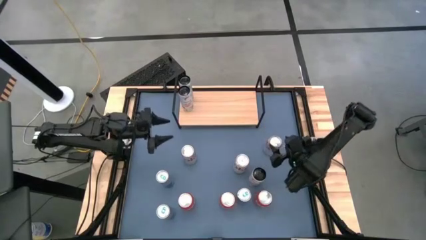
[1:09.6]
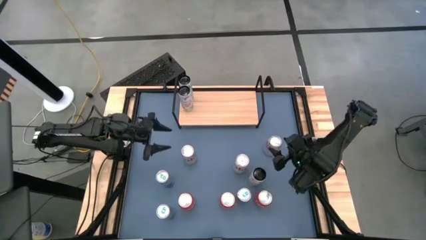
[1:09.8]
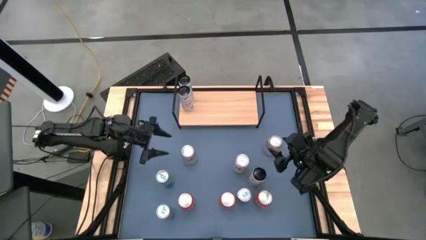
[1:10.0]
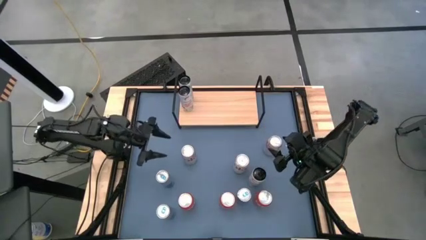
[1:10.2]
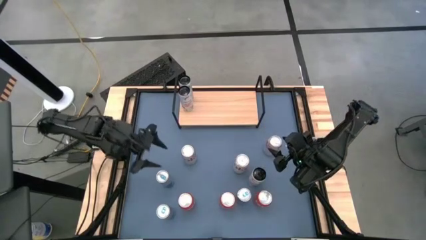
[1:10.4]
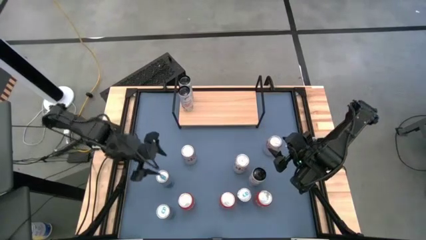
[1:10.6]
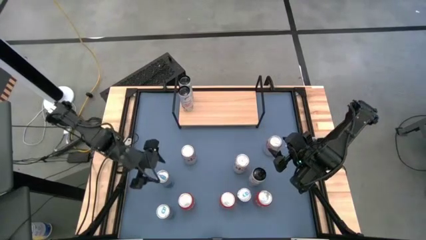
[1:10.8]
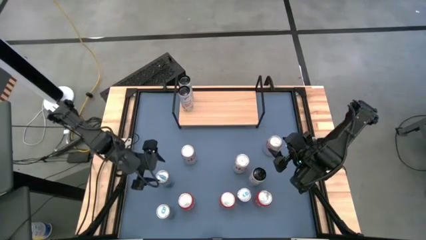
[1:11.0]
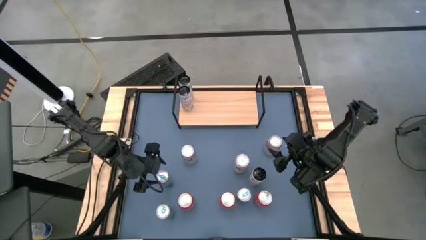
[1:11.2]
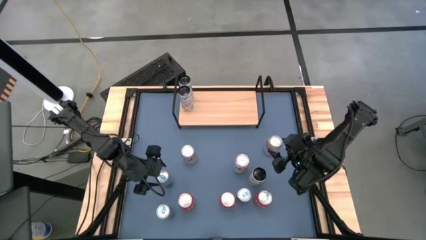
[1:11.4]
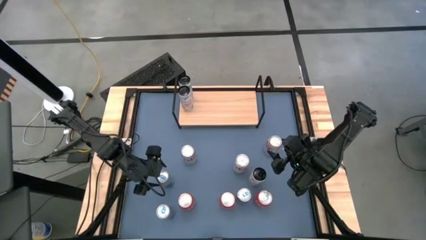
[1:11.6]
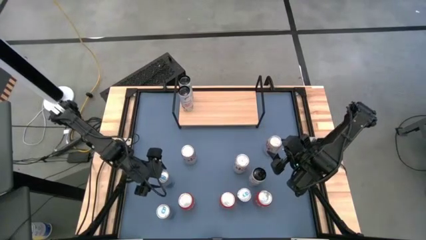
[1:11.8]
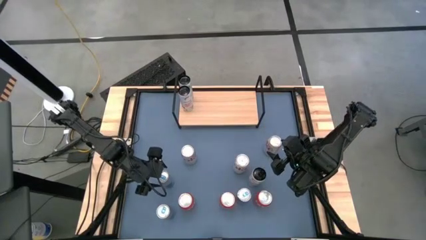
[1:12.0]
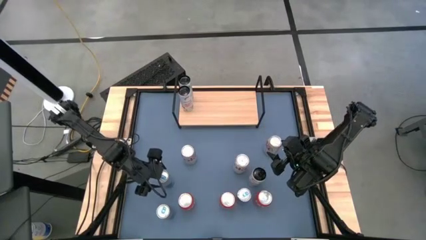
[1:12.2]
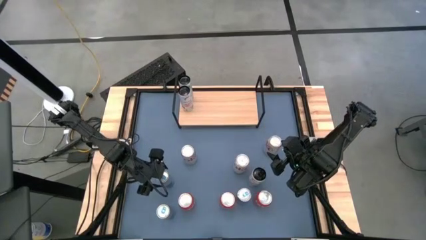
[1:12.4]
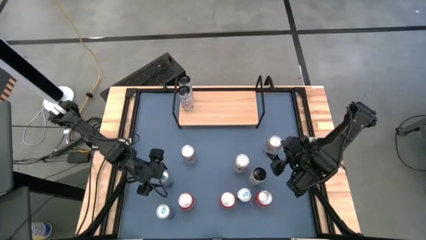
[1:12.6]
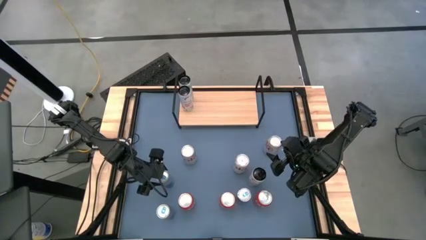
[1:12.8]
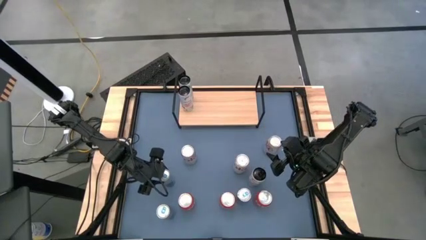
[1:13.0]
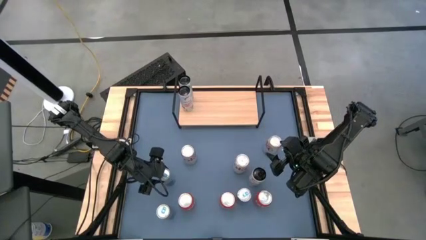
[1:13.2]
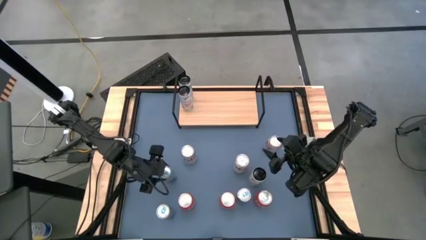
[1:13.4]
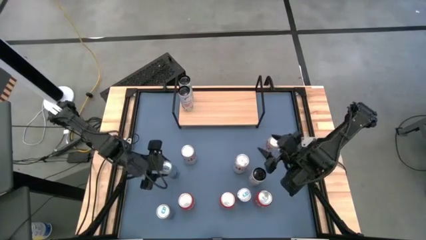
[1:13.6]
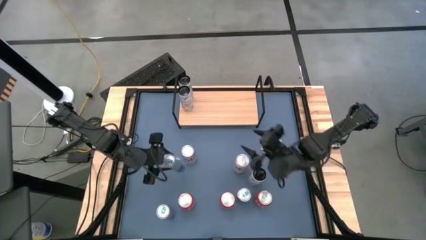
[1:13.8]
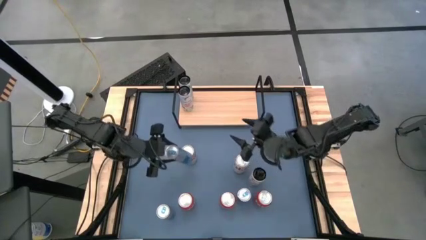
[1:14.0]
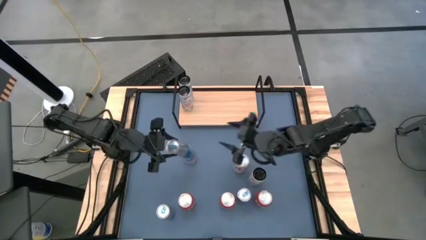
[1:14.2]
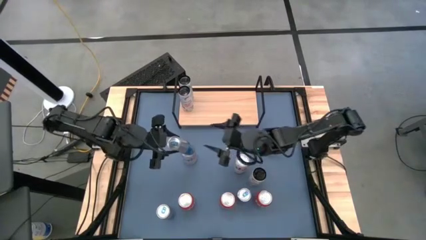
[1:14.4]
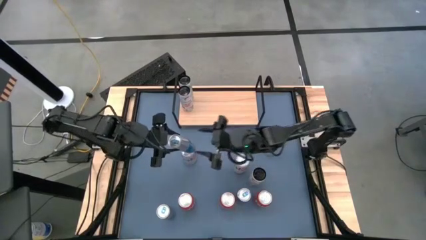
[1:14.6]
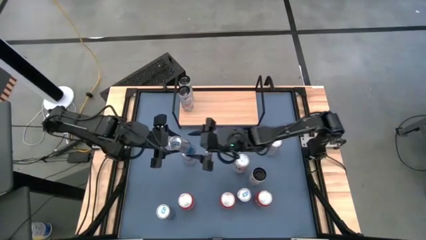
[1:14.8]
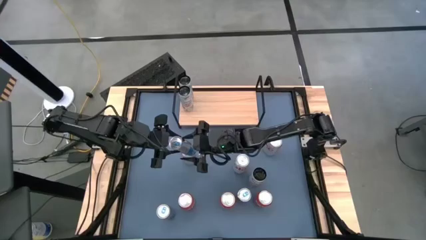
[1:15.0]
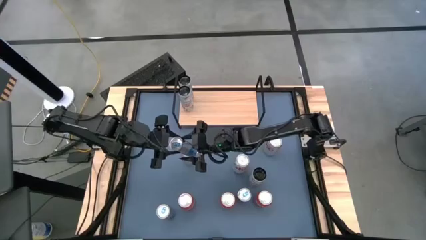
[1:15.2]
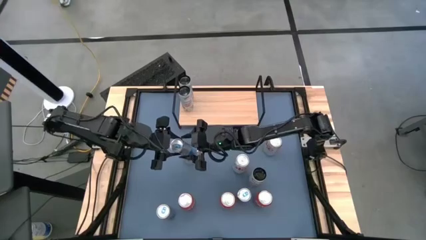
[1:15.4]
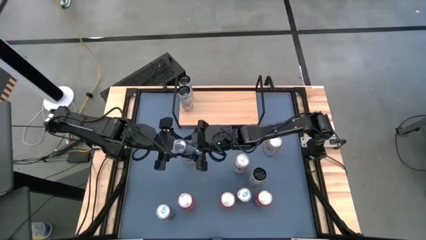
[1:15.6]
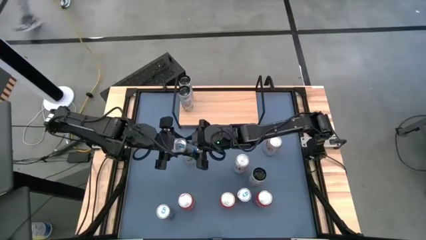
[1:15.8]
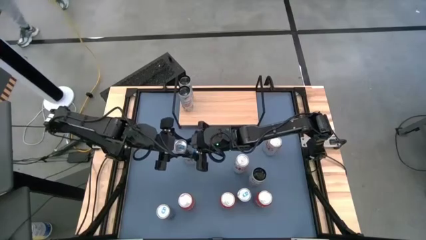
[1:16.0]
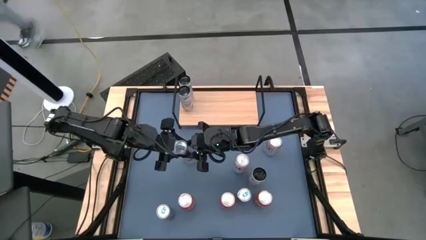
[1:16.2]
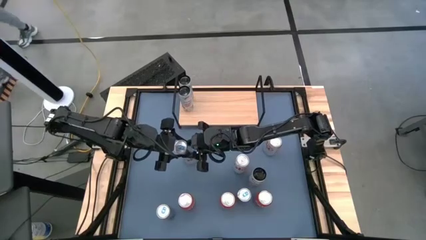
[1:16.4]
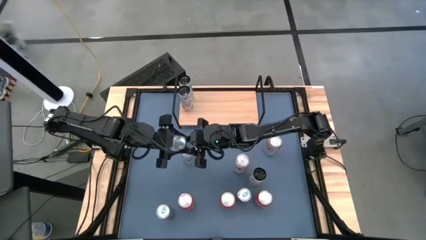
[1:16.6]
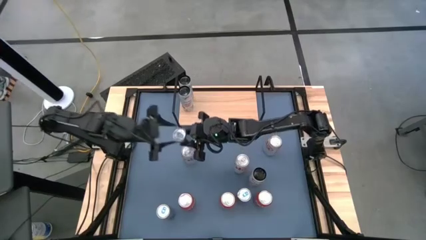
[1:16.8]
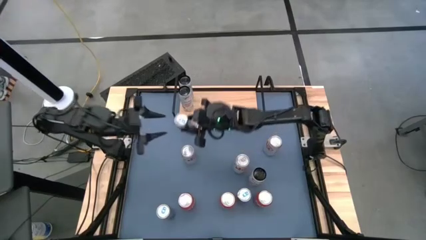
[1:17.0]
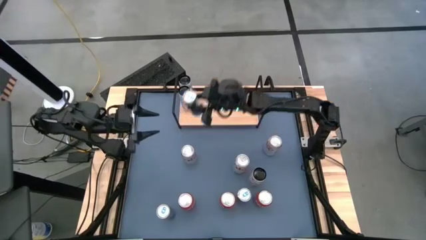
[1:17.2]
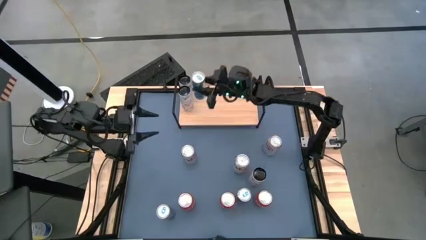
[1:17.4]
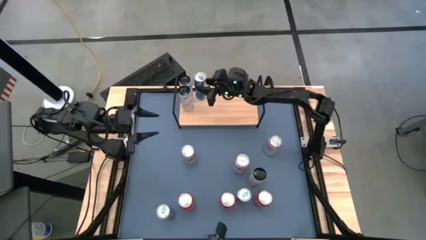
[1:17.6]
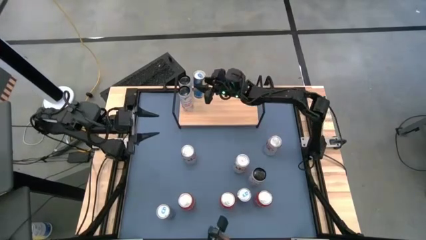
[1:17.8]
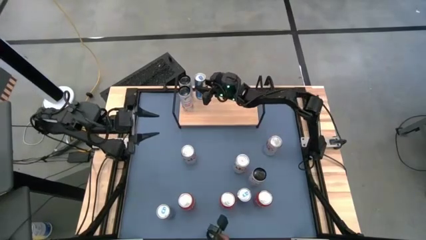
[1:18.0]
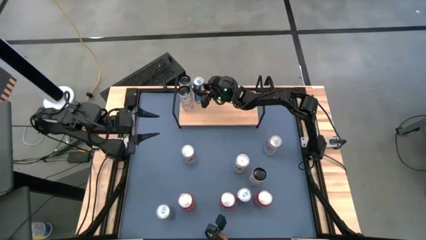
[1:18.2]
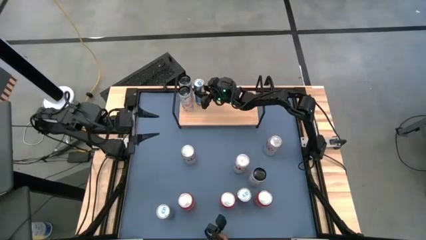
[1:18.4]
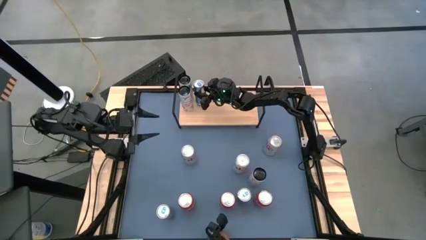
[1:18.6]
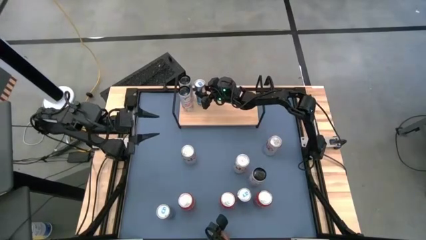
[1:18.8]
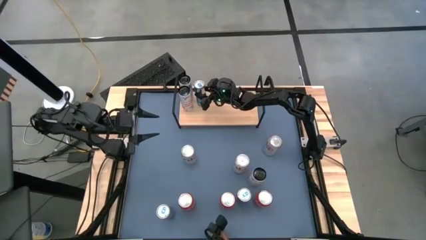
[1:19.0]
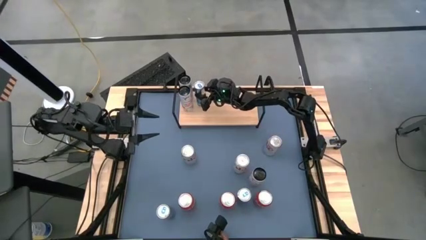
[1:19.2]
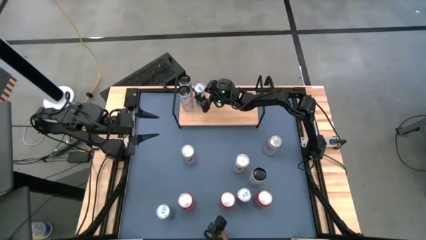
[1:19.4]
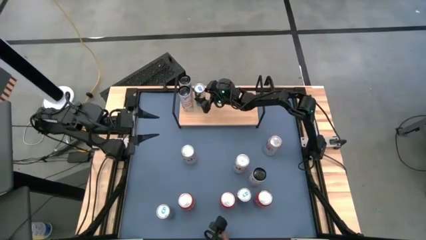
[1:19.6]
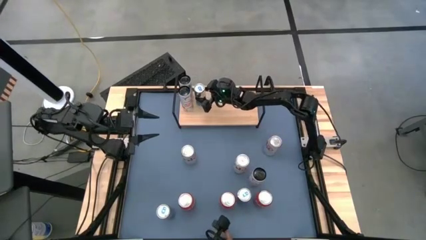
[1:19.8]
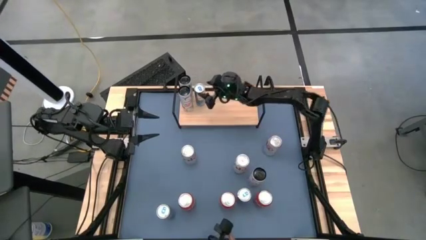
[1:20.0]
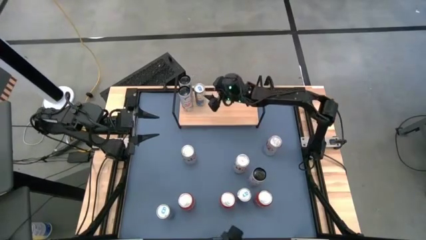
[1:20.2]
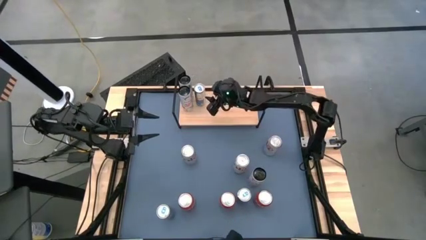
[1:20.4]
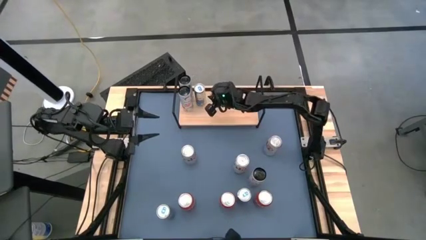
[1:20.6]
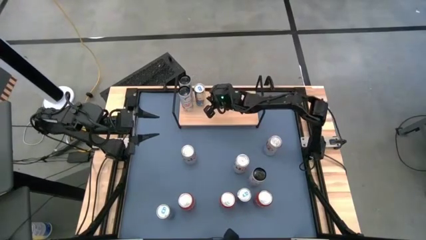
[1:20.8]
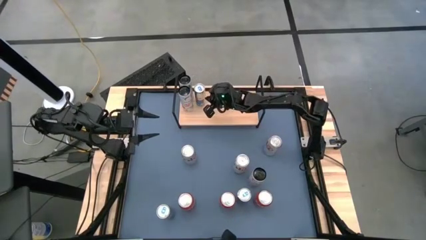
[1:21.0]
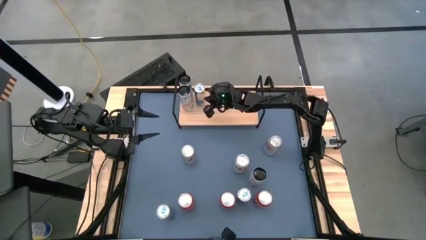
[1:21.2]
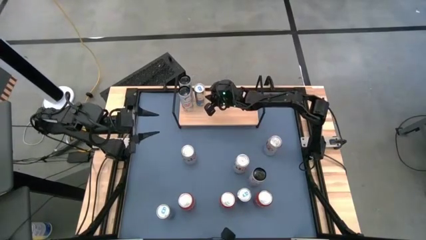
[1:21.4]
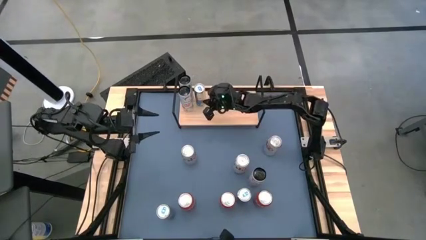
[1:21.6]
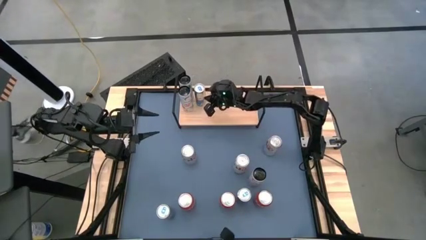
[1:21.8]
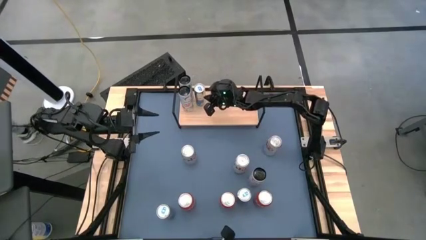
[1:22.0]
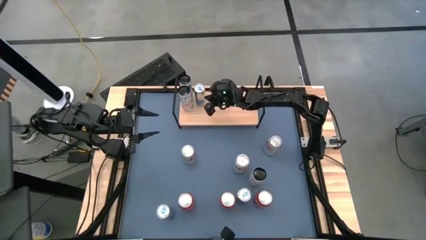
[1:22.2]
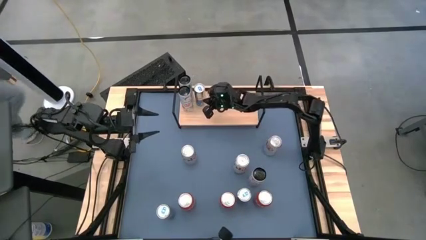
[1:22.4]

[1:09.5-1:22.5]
Task: Place canned beverage on shelf
Put the top blue soda can on the shelf

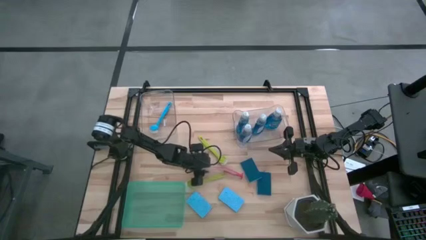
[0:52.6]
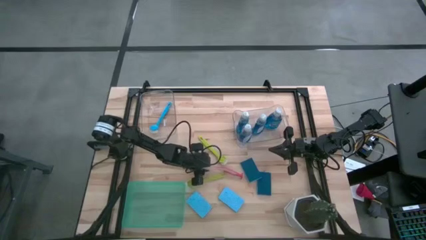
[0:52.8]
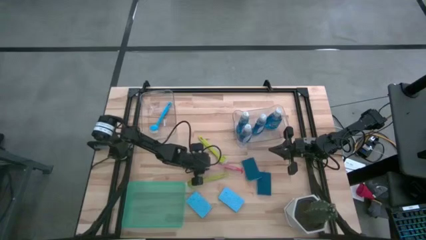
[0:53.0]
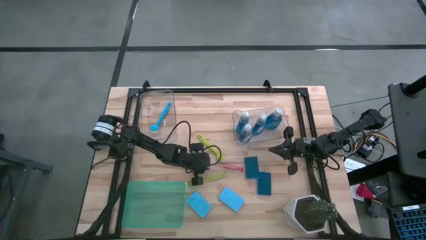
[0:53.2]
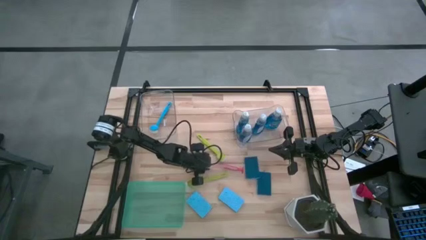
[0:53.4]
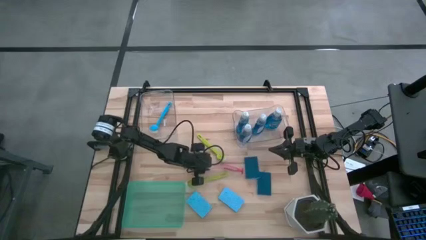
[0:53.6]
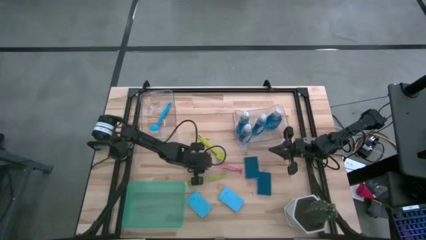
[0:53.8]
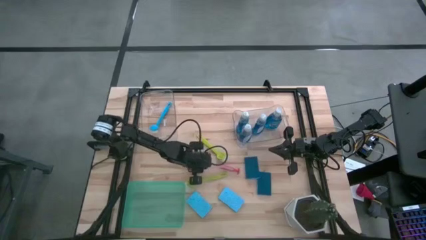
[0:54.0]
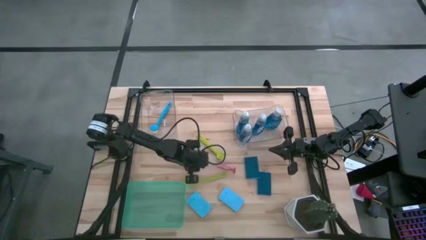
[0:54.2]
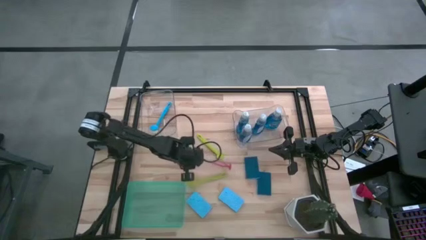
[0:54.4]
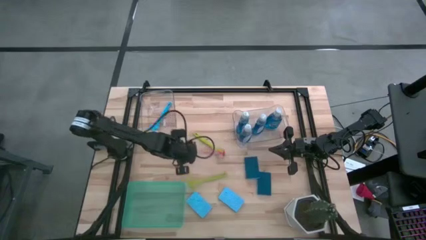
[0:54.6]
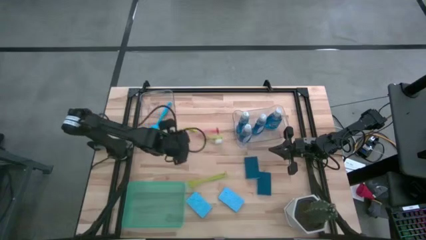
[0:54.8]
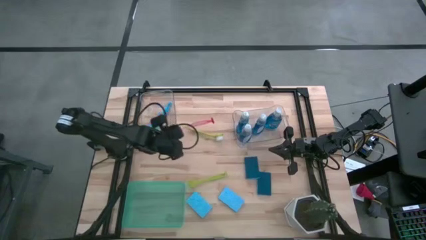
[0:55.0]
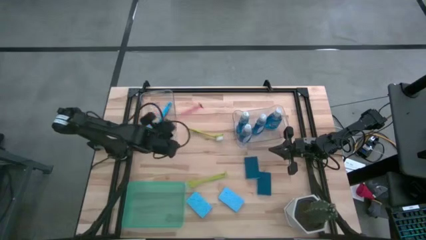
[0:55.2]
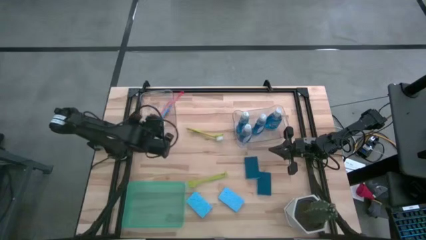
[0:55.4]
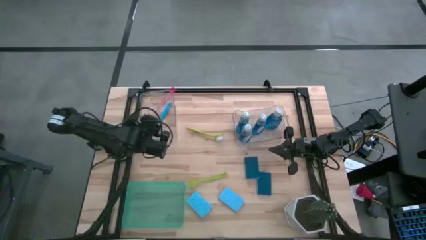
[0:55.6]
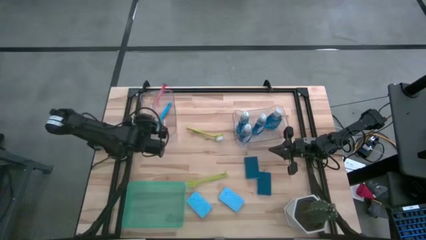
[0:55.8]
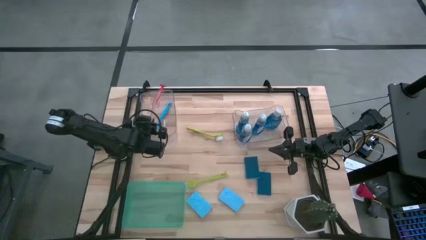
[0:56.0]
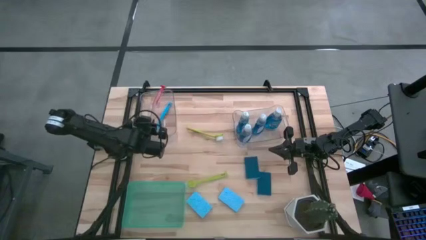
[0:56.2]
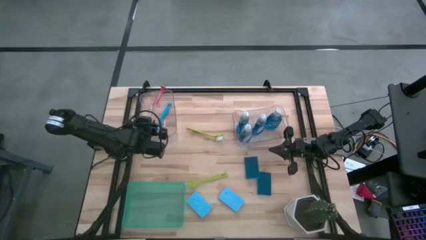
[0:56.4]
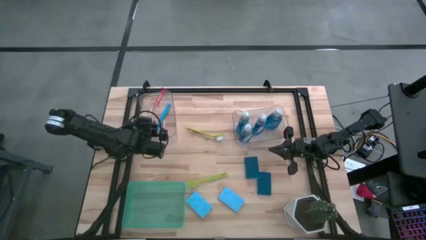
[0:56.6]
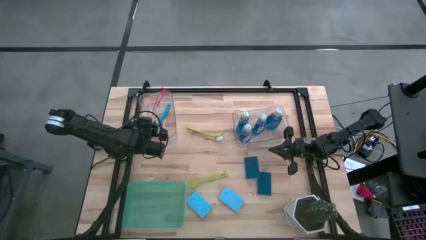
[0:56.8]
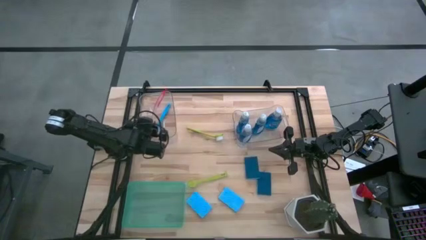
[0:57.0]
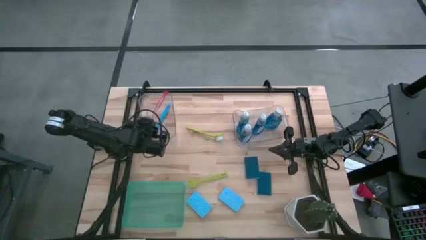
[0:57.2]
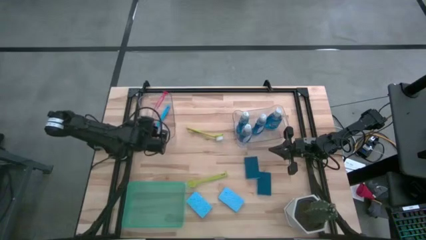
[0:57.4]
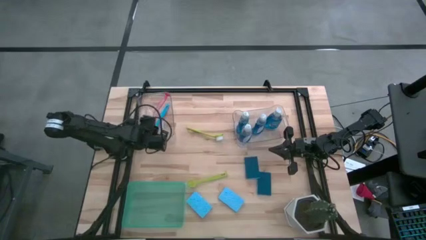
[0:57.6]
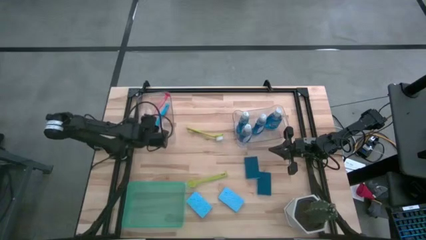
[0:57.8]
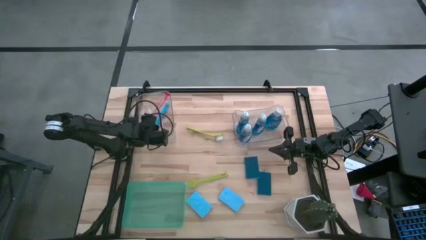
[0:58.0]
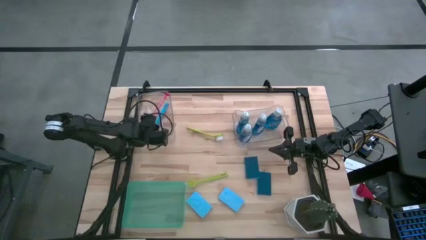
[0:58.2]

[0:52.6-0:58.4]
Task: Pick & Place Kitchen Sink Supplies
Put the orange dish brush into the left transparent bin
